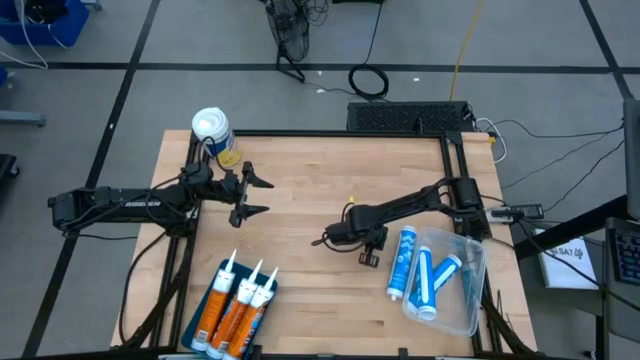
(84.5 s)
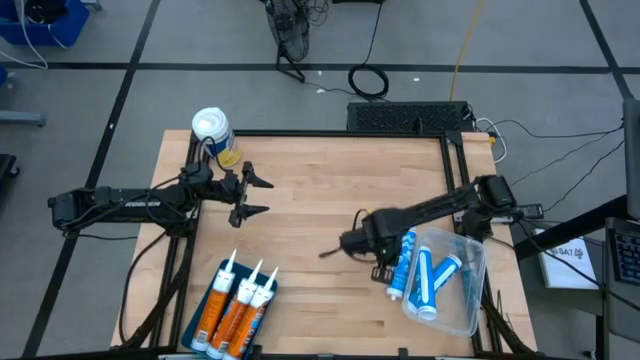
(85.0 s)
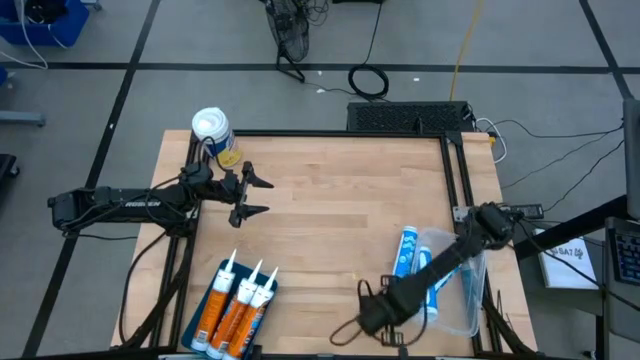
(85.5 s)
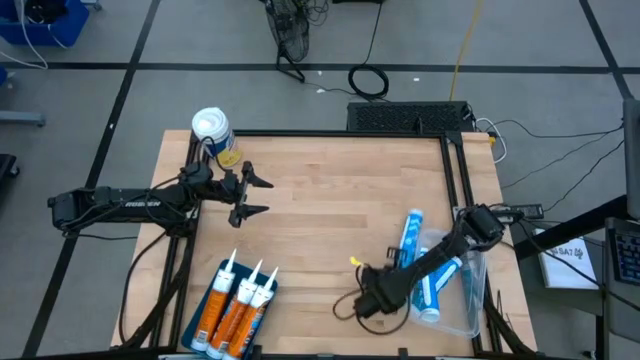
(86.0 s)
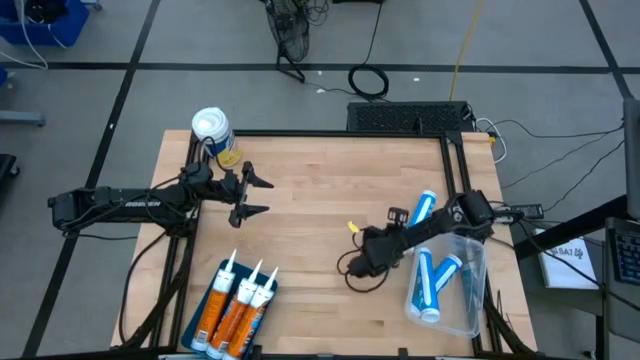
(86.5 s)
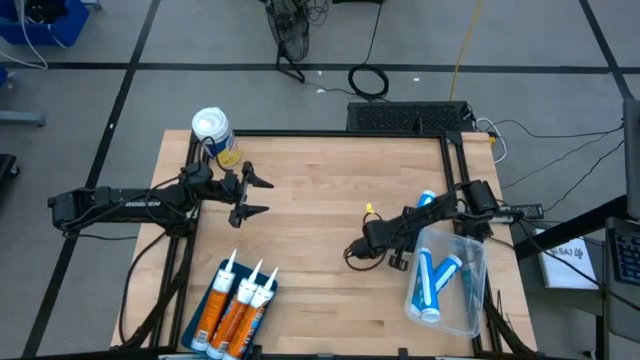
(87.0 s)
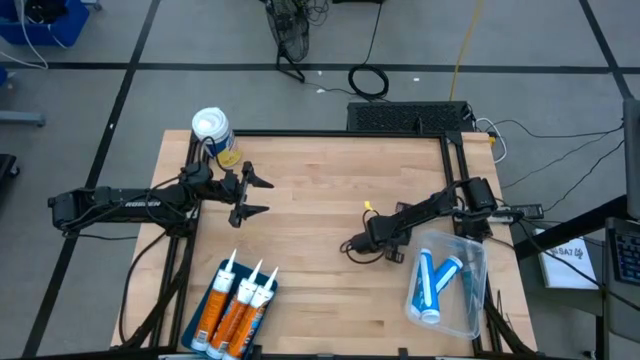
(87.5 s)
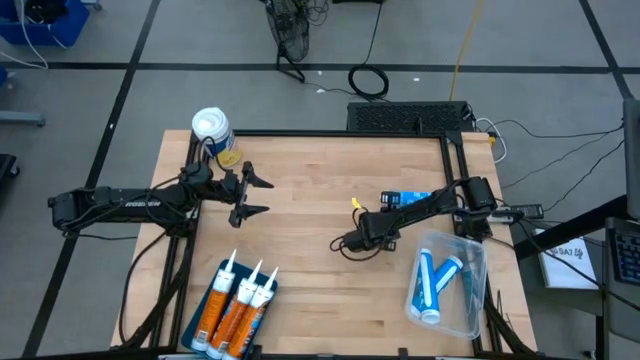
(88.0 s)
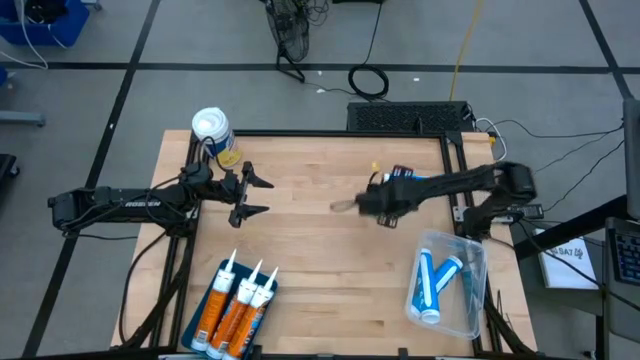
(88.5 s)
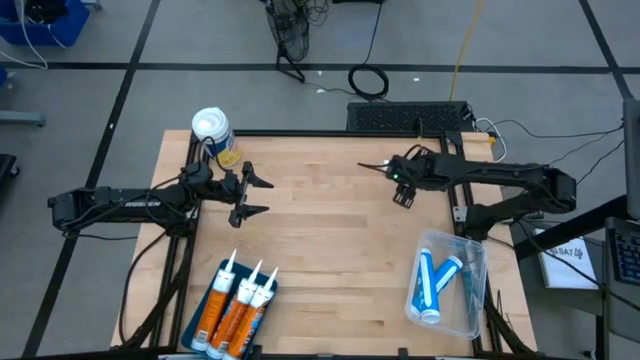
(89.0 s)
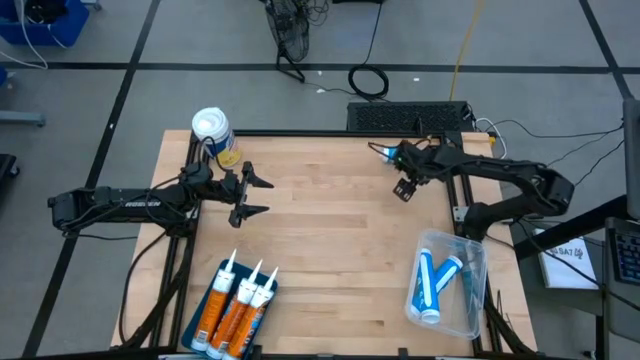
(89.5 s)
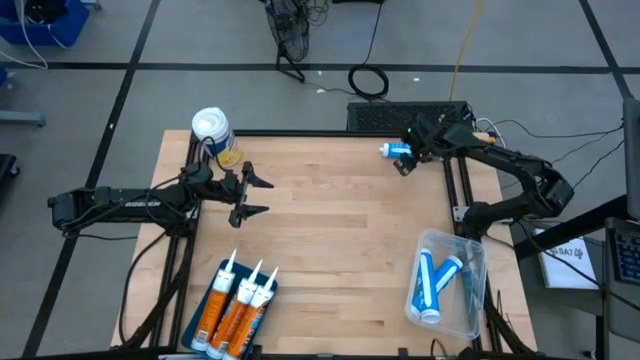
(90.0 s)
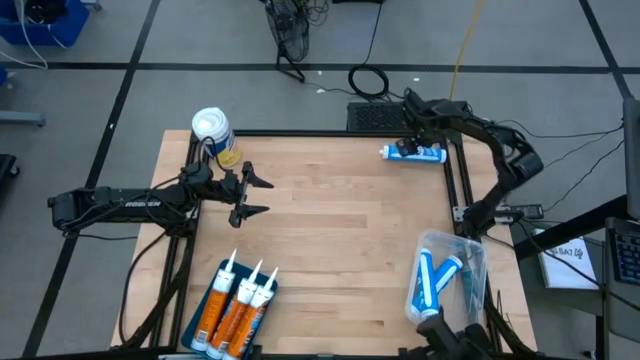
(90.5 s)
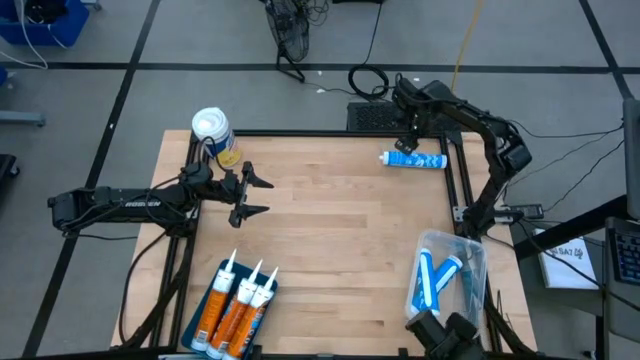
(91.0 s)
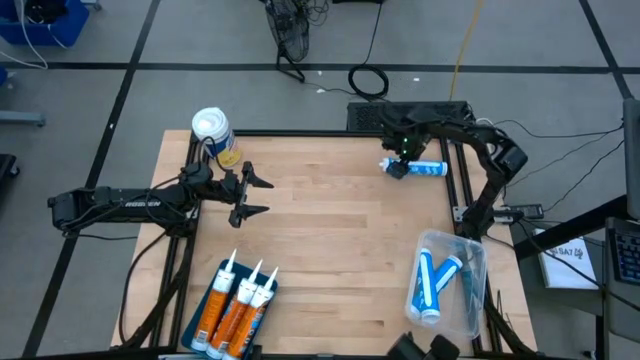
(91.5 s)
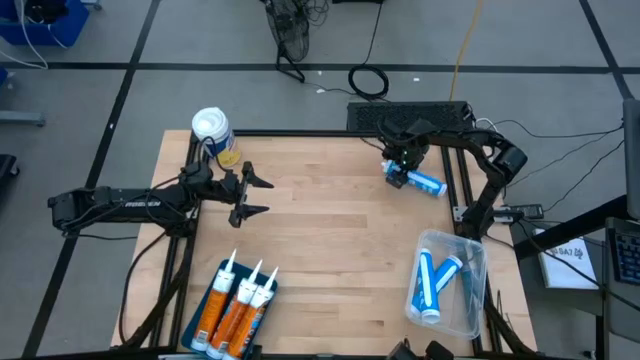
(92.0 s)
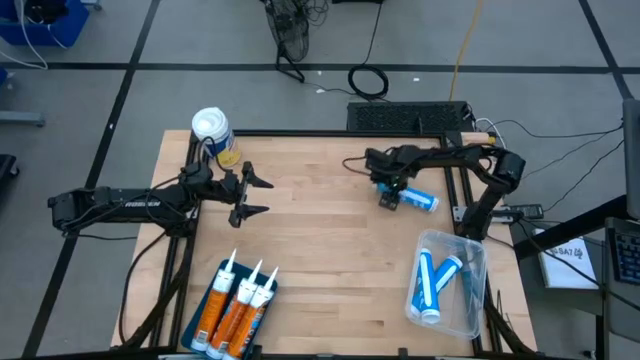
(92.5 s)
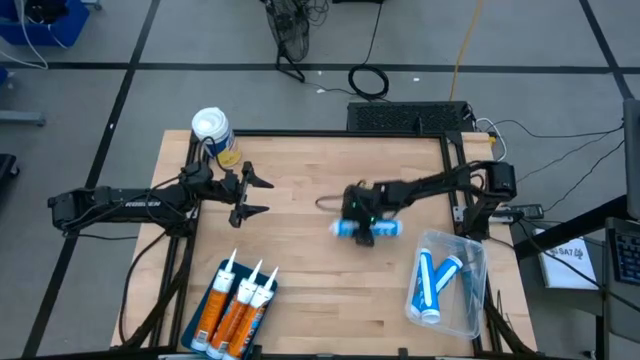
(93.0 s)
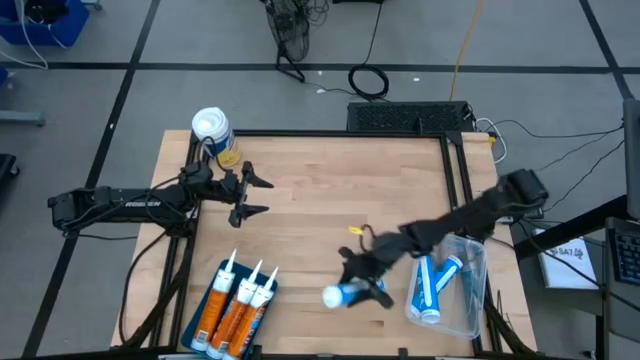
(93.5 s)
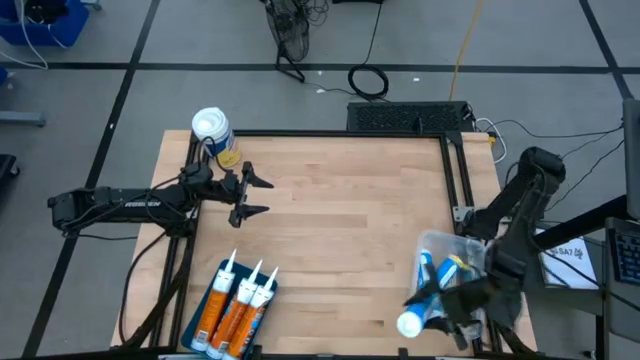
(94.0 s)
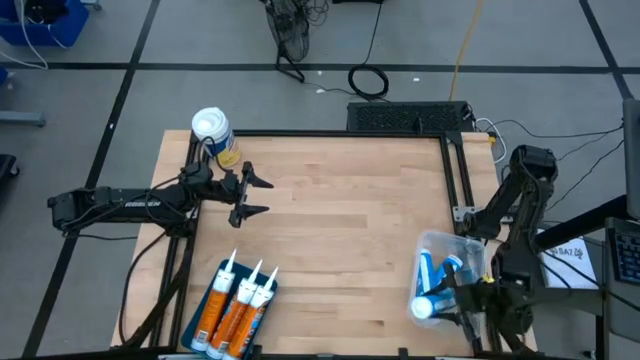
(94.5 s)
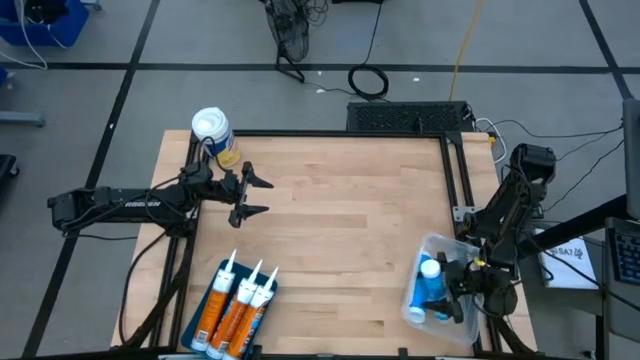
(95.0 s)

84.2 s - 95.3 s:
Task: Pick & place silicon tubes, Sealant and Lysol wipes
Put the blue sealant into the transparent bin

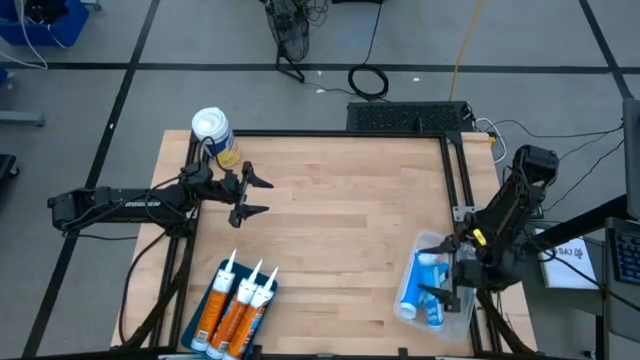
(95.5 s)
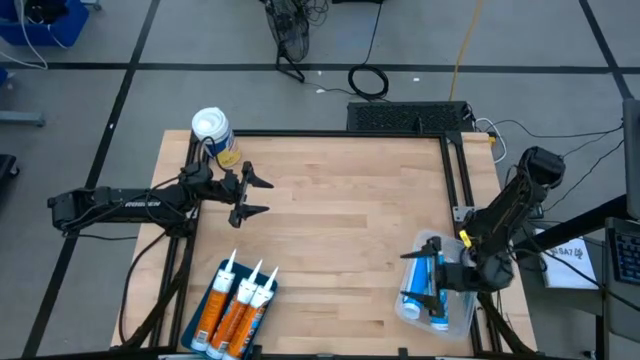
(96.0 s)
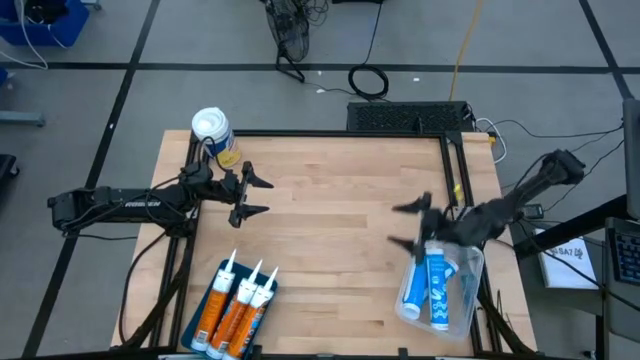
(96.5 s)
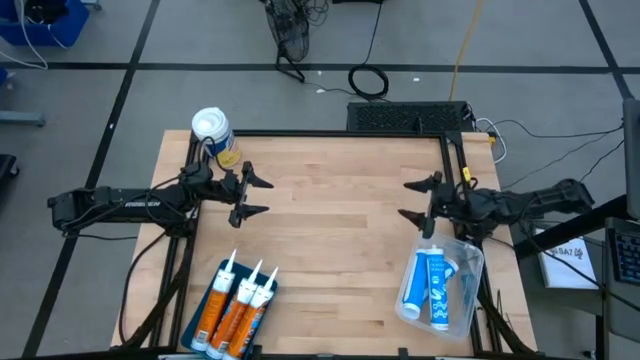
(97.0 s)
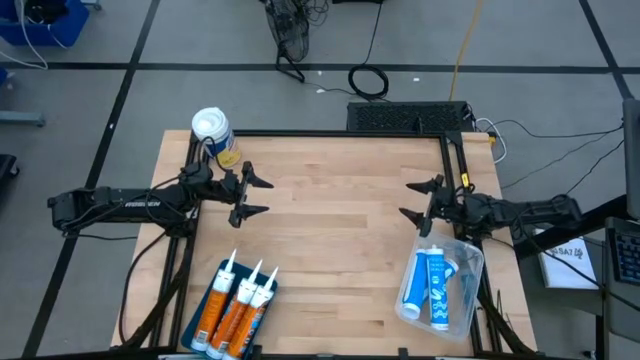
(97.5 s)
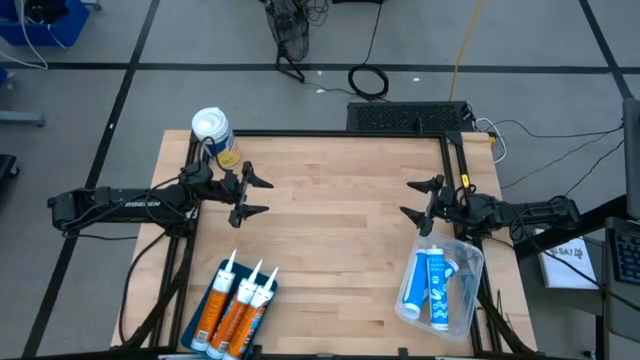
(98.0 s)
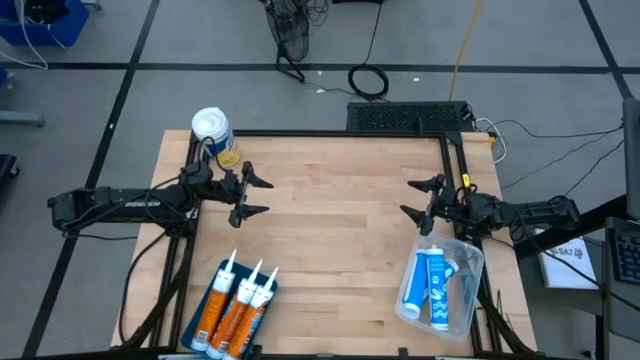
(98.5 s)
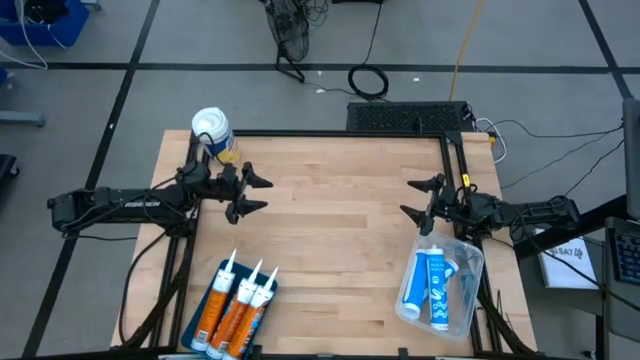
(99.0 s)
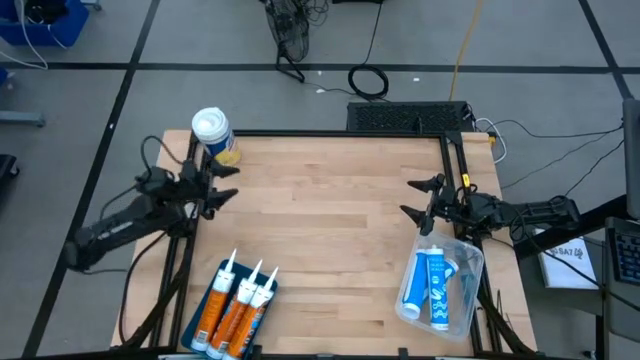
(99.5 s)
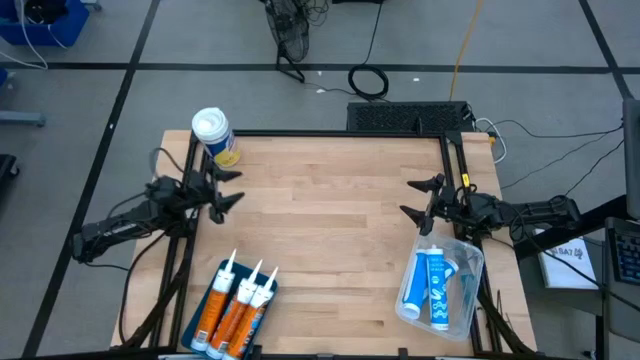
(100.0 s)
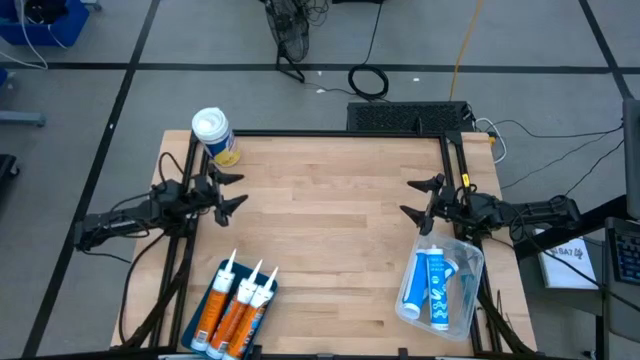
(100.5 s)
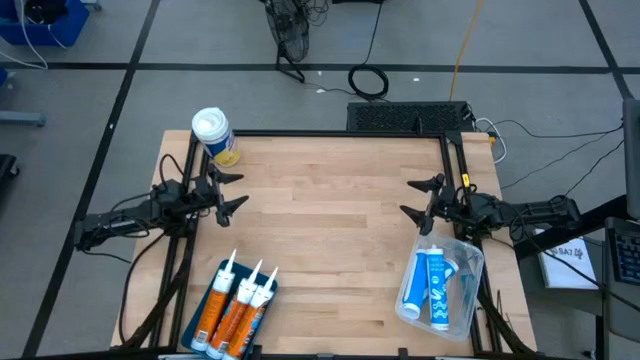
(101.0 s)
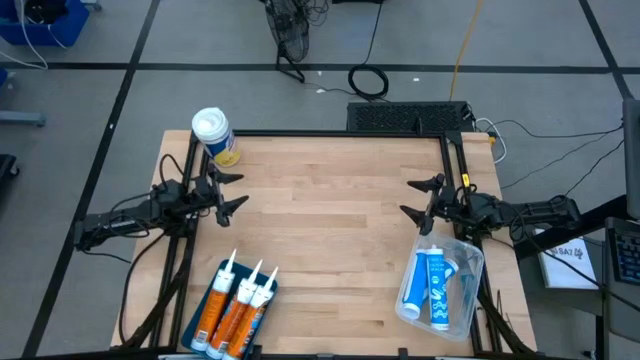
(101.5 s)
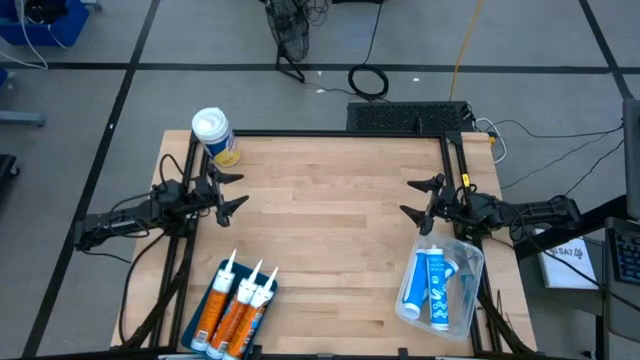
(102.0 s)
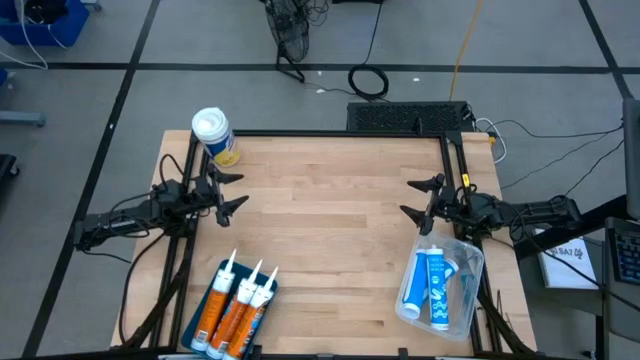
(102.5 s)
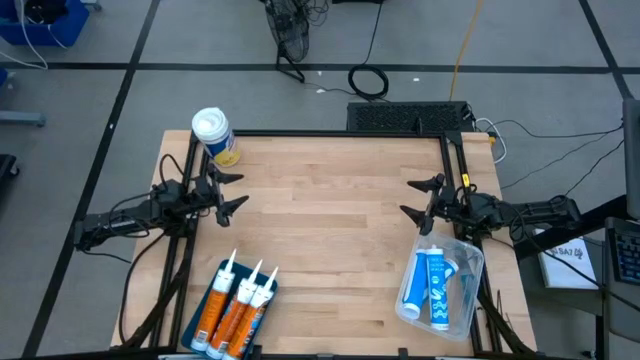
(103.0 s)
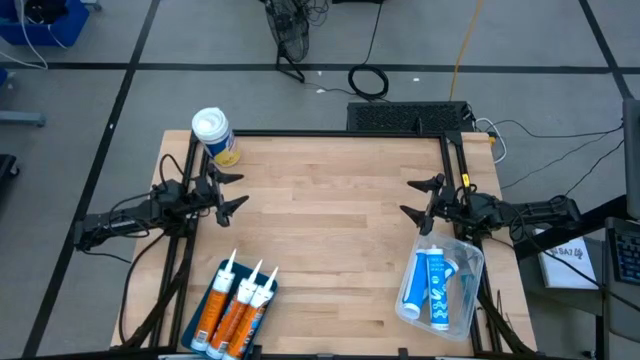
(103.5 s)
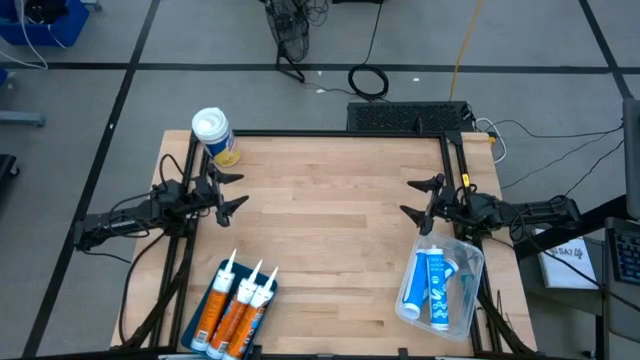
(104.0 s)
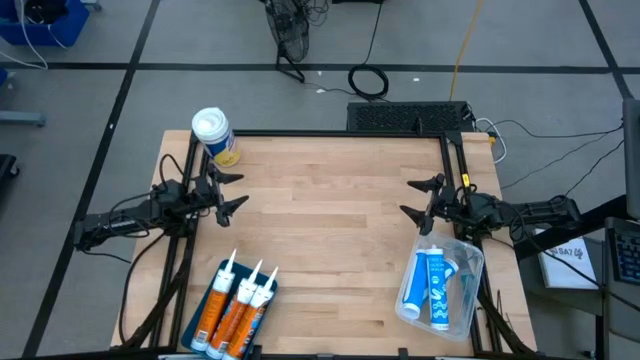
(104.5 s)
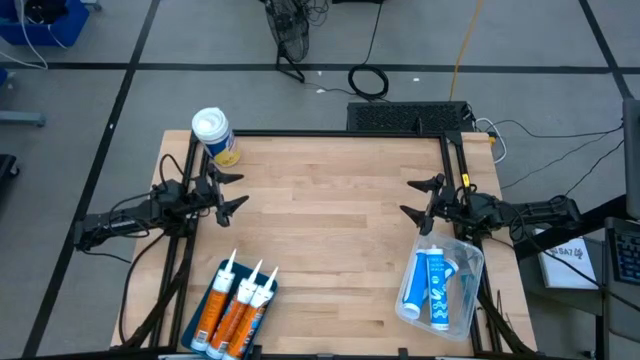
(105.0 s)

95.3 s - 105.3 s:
Return to Home Position
